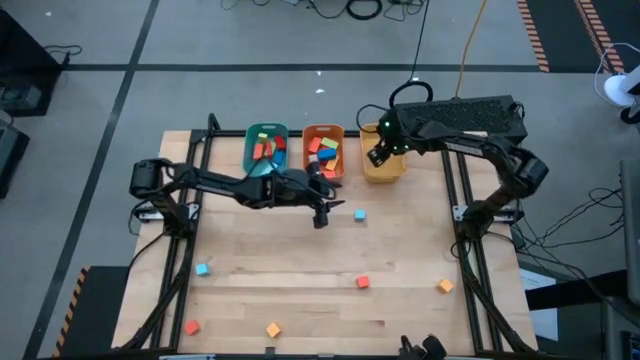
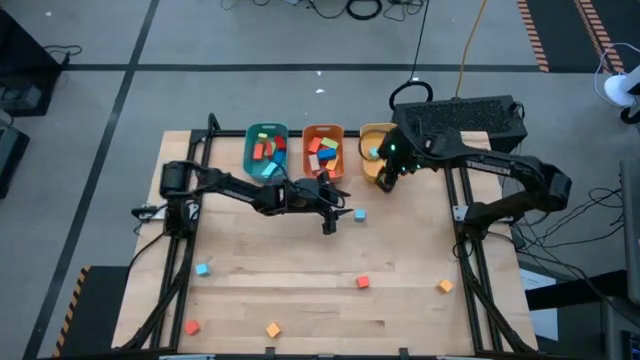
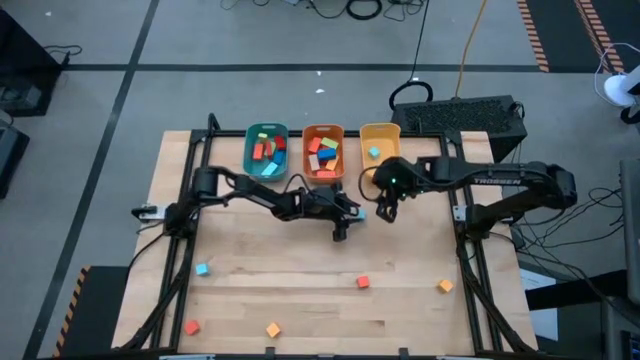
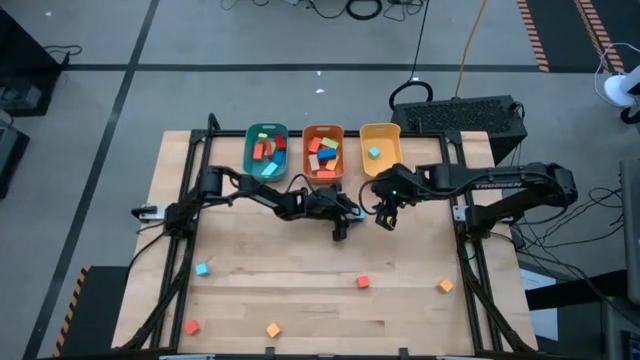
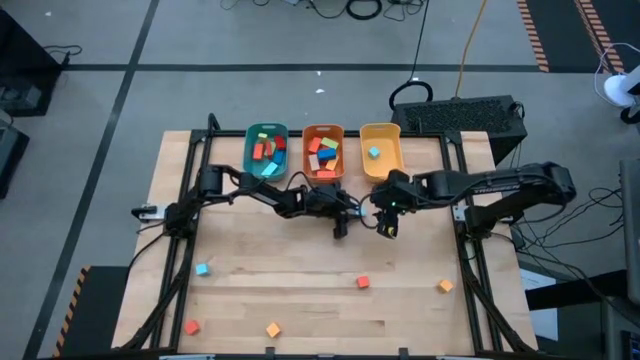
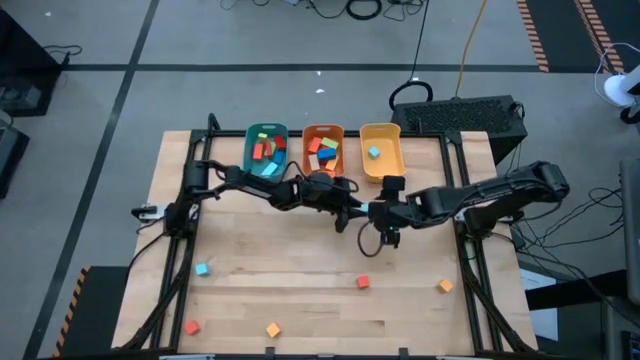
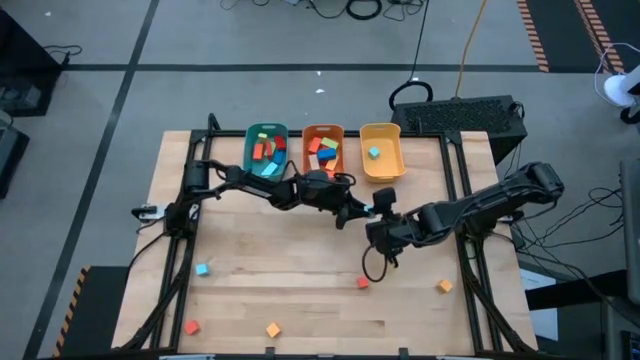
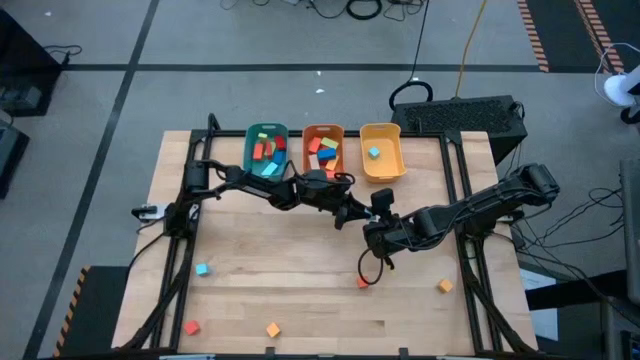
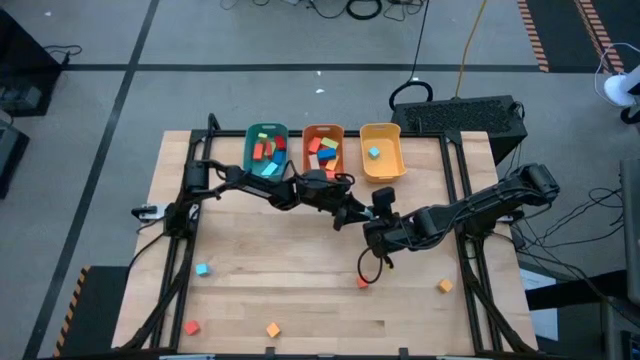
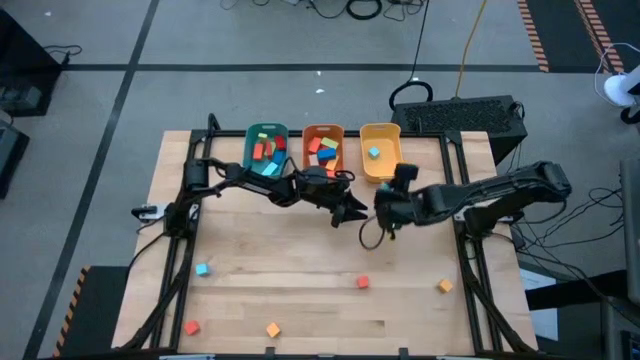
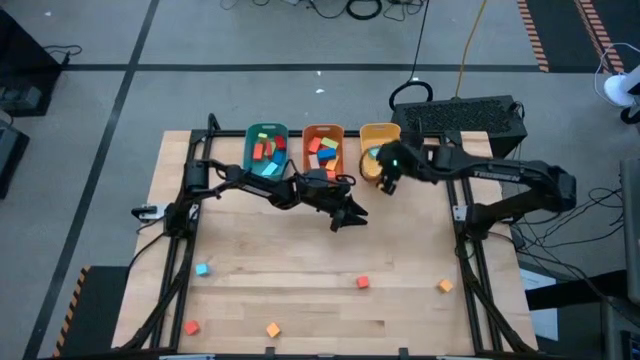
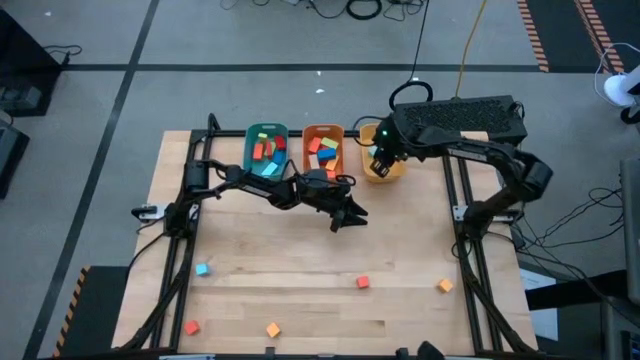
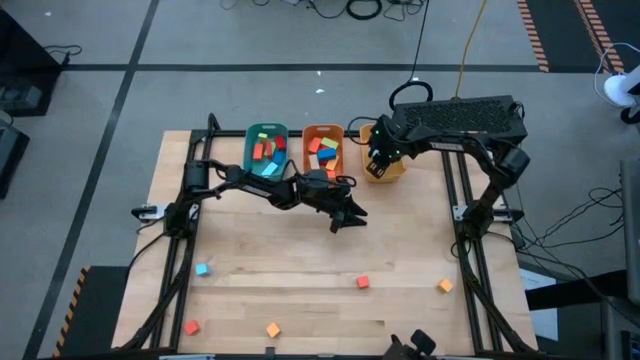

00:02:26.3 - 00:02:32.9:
Task: Sort blocks by size
Put the right blue cube block into the yellow bin

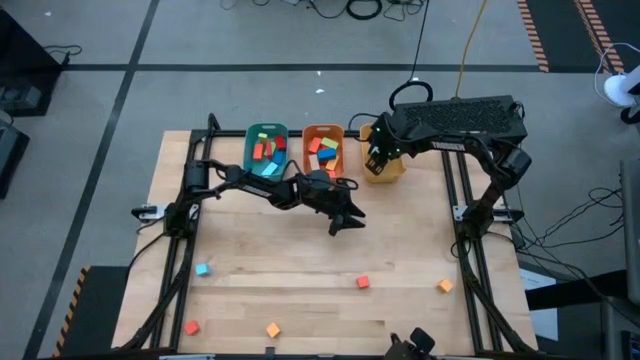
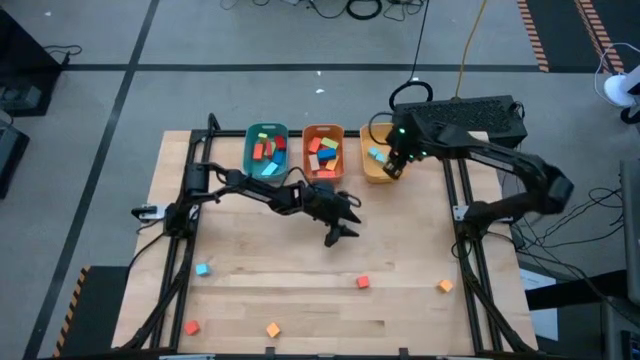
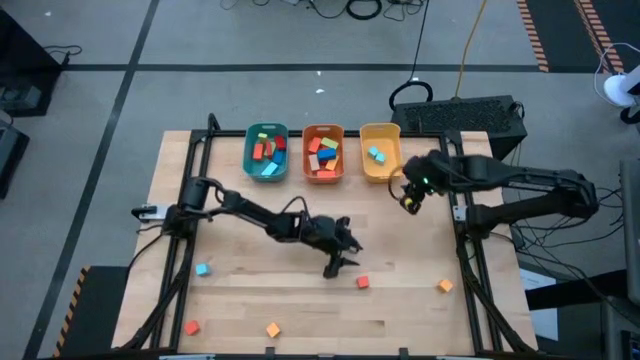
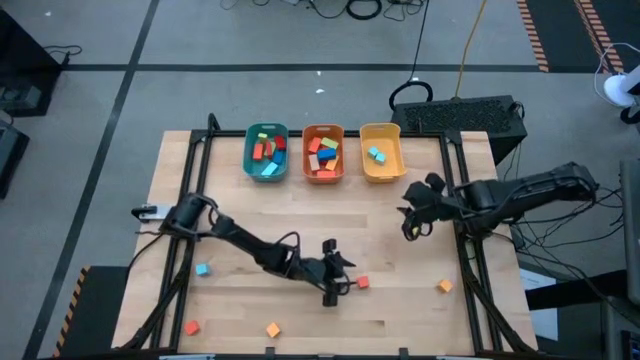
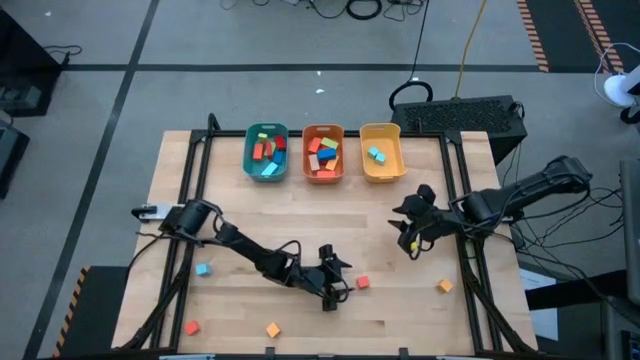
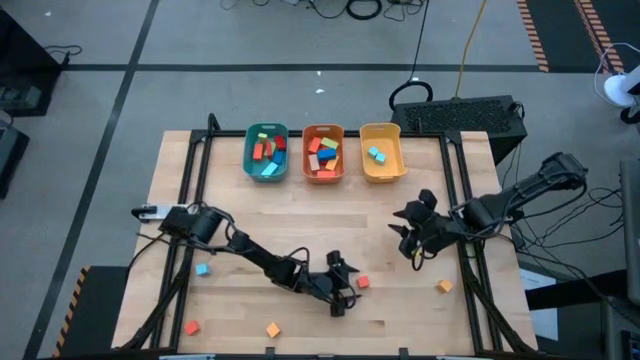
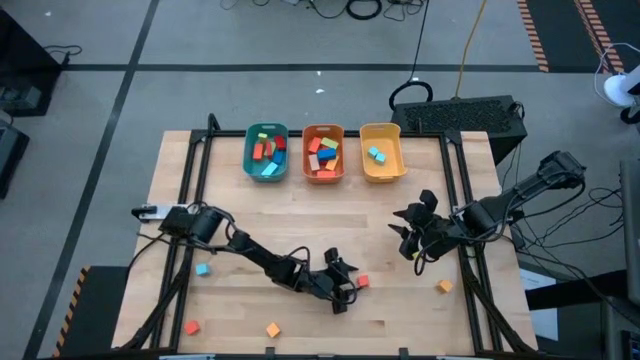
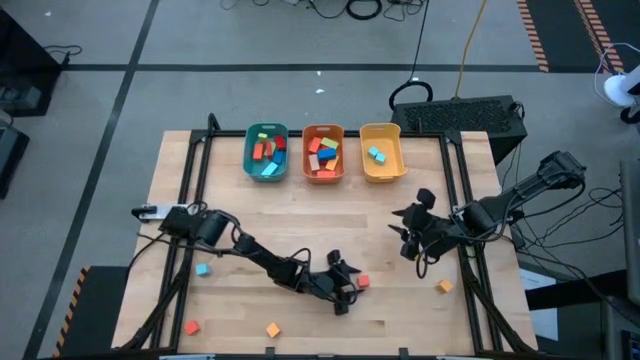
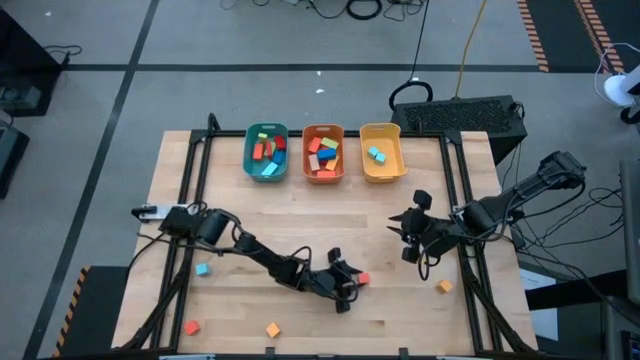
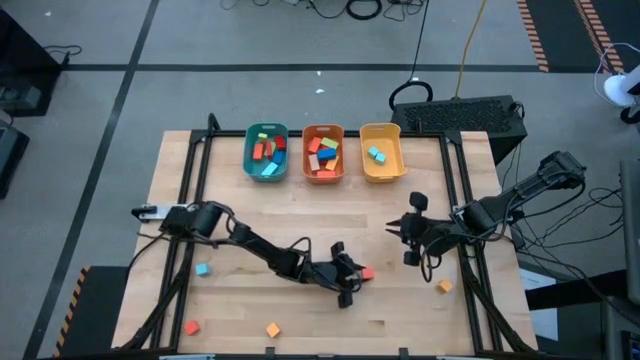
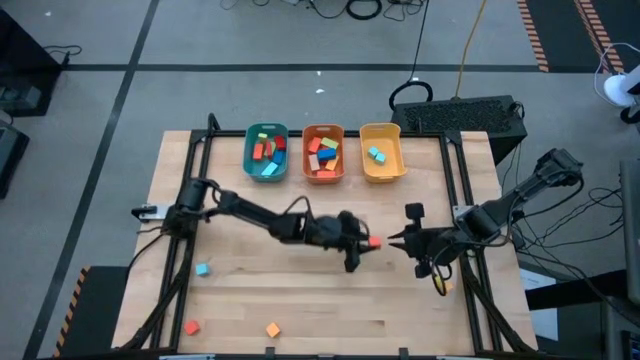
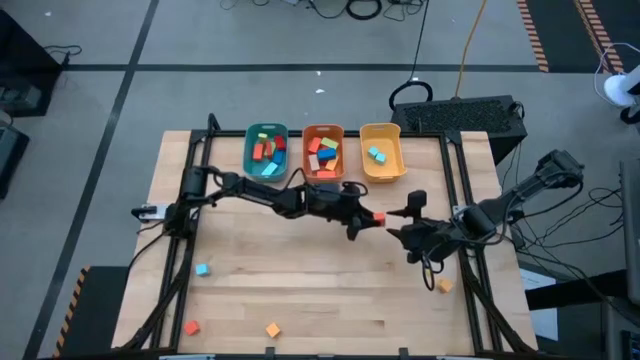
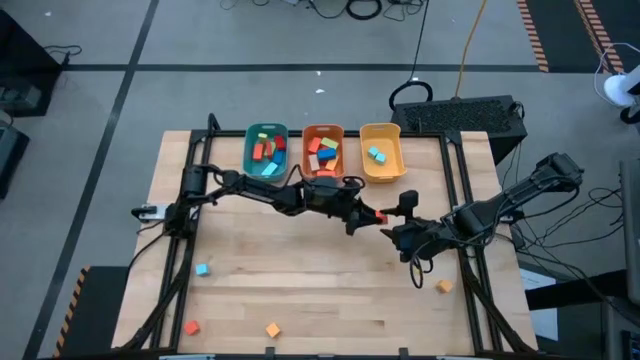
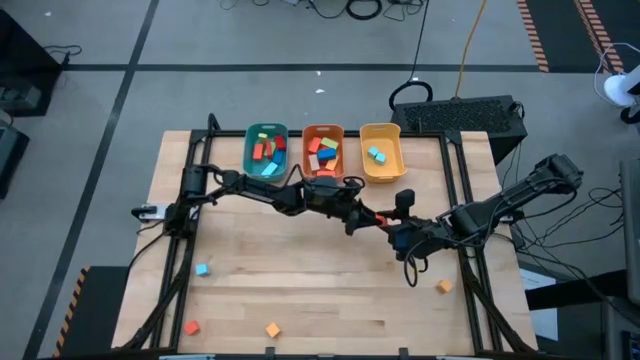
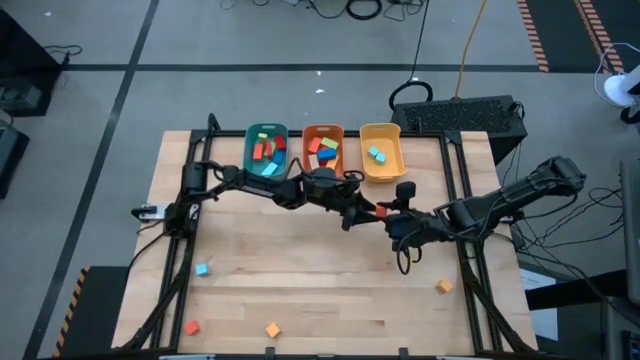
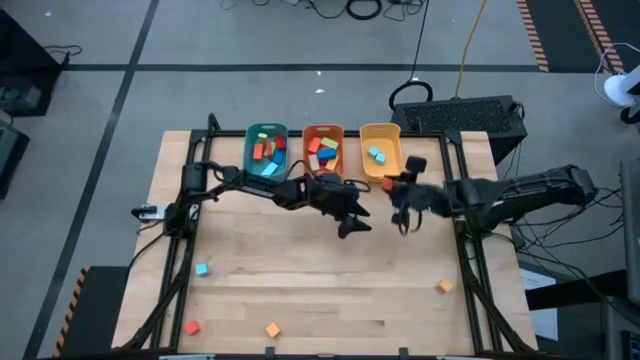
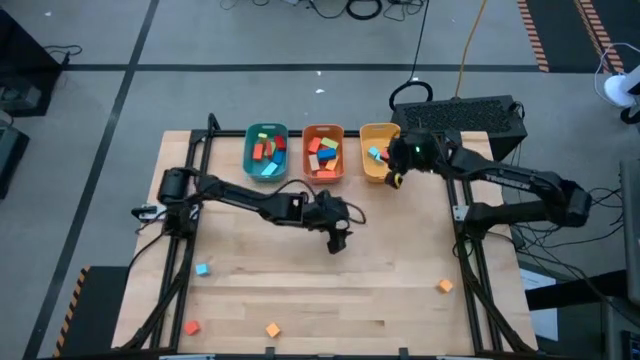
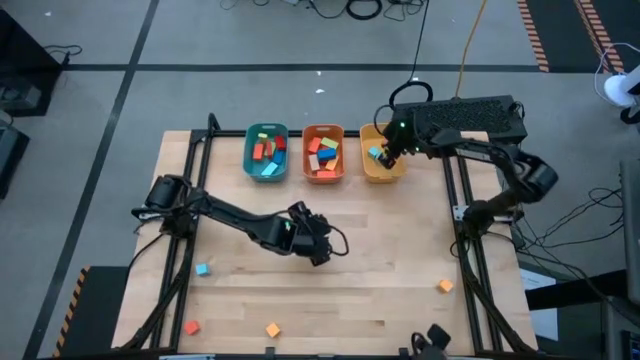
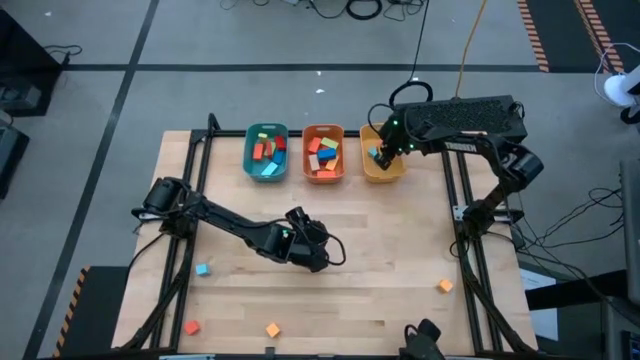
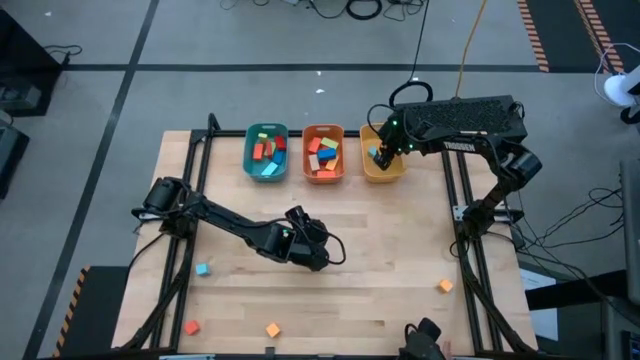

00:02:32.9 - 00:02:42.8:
Put the right orange cube block into the yellow bin

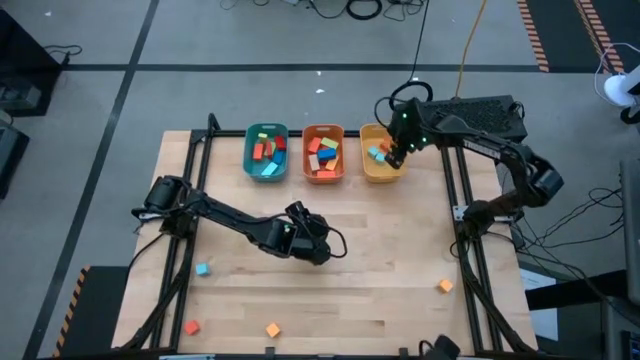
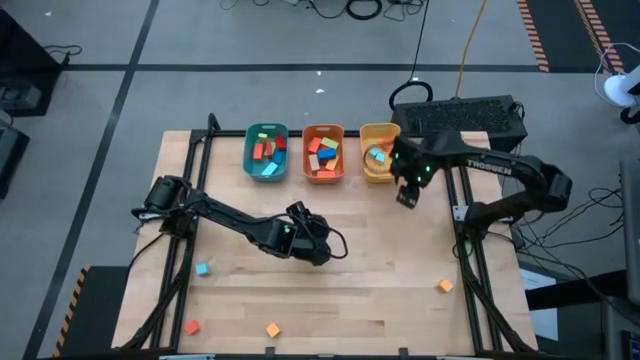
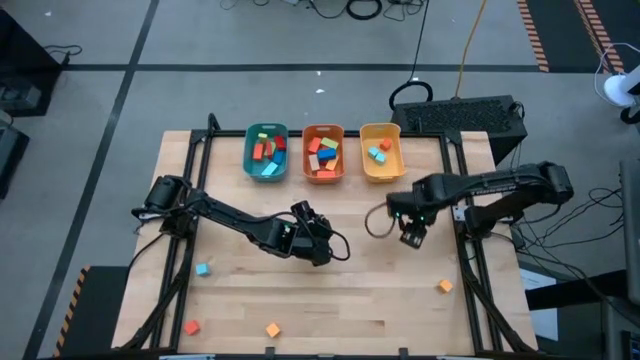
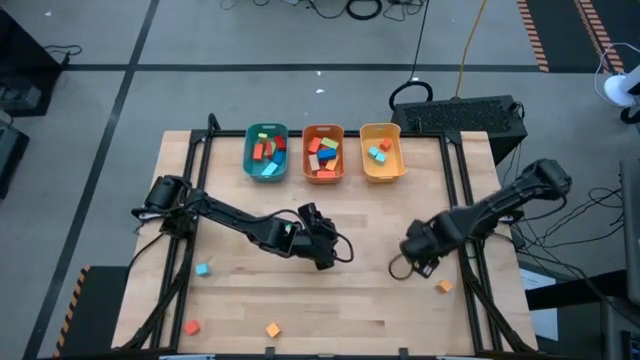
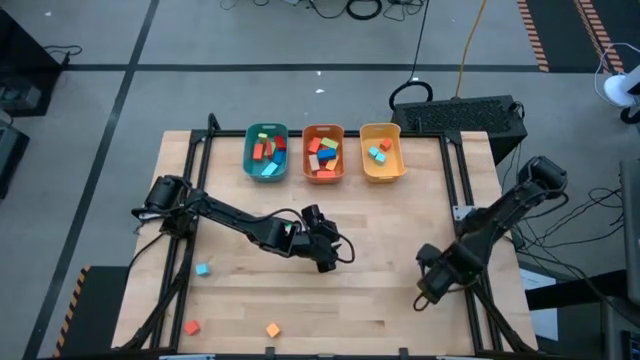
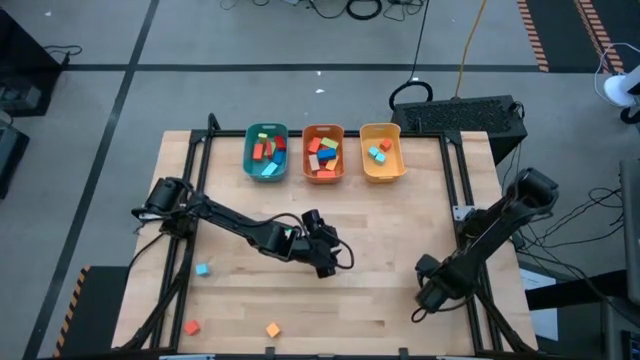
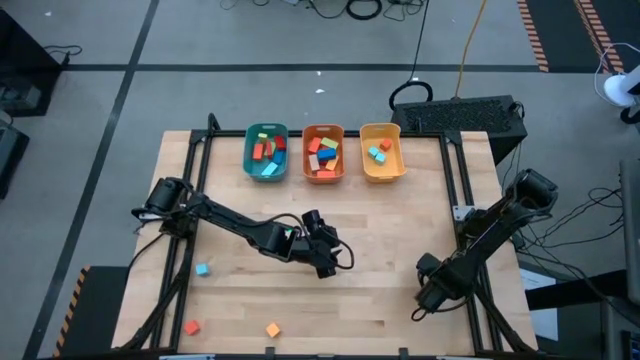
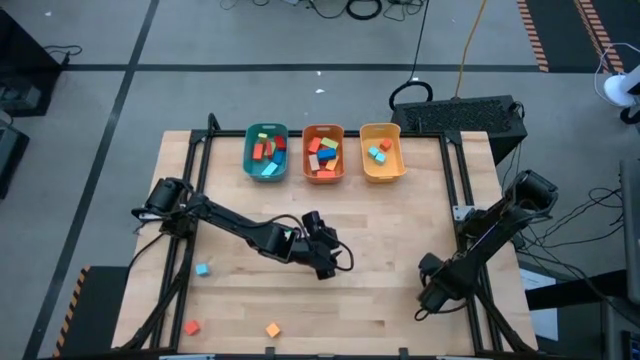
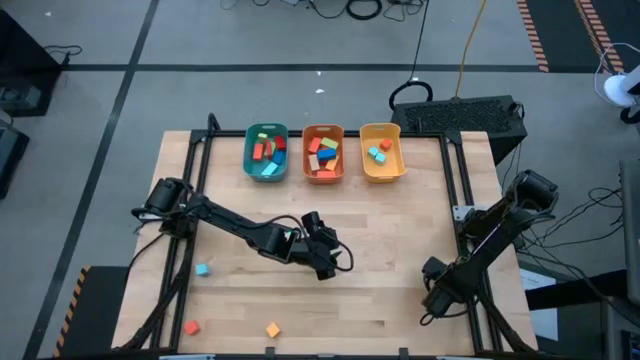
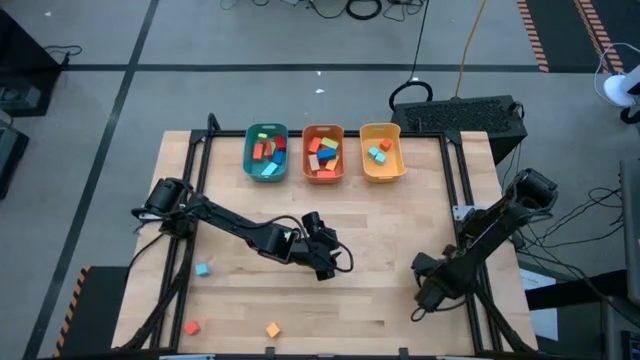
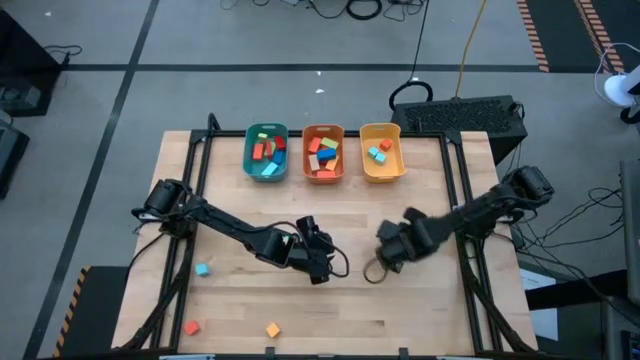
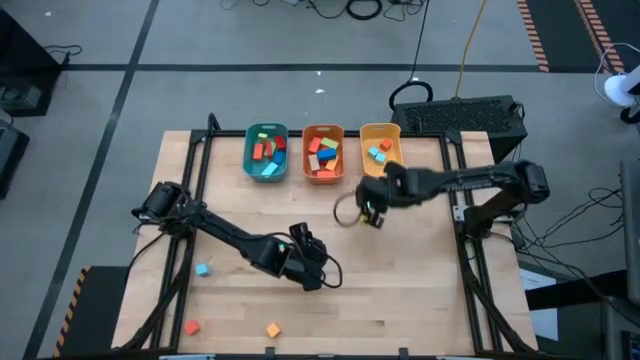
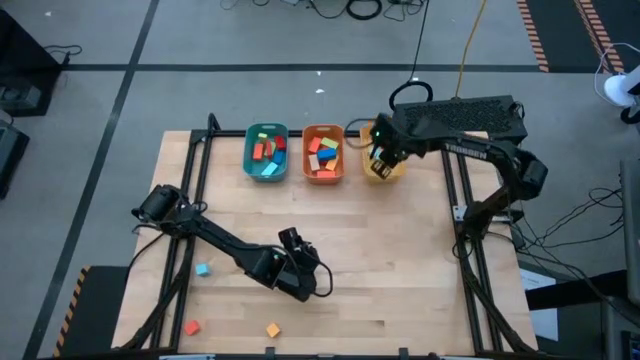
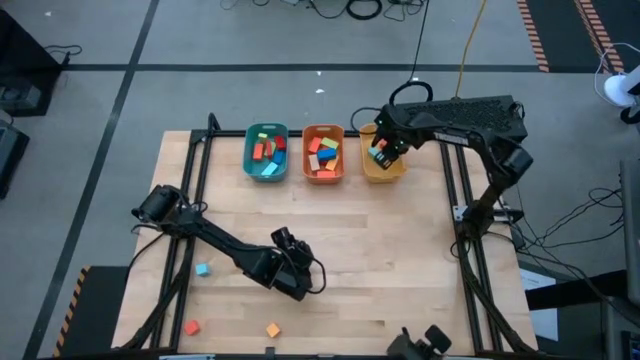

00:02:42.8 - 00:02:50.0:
Put the right yellow cube block into the yellow bin
